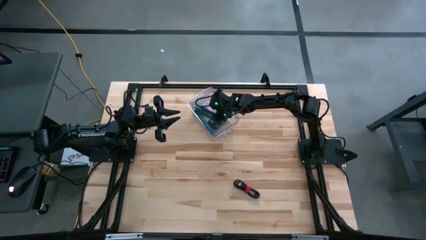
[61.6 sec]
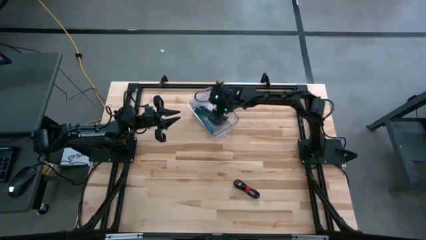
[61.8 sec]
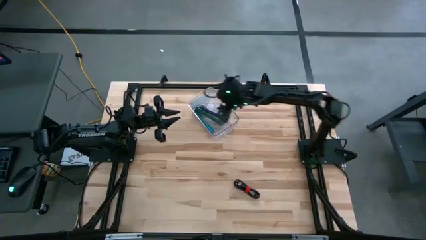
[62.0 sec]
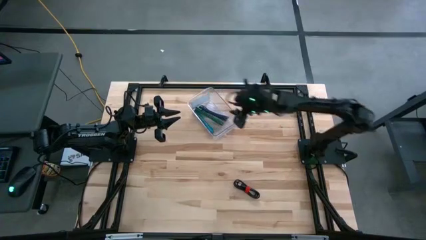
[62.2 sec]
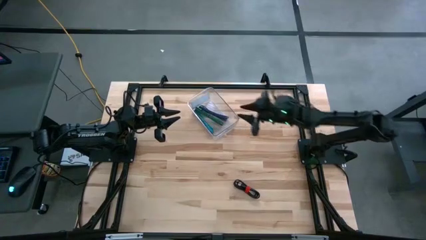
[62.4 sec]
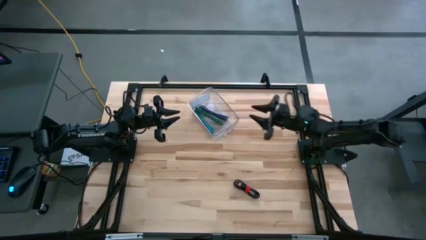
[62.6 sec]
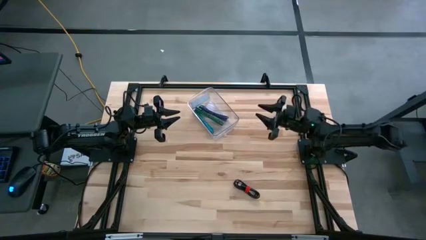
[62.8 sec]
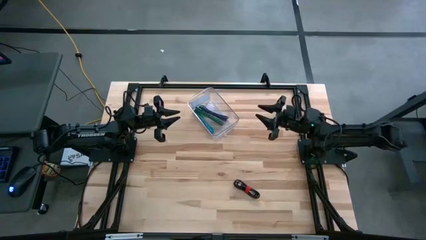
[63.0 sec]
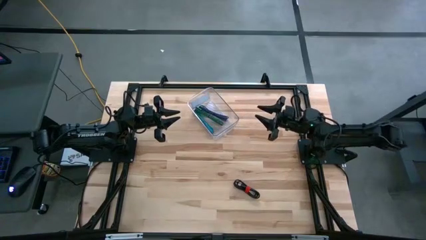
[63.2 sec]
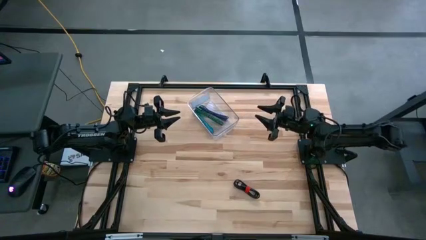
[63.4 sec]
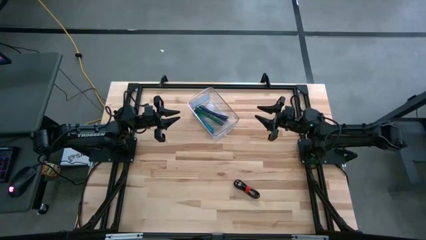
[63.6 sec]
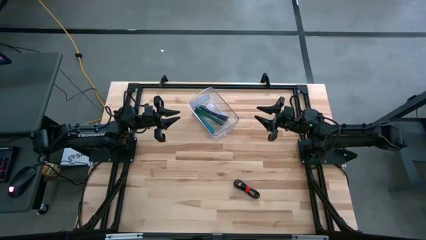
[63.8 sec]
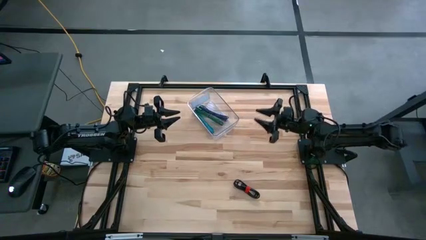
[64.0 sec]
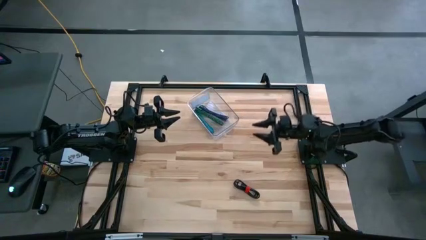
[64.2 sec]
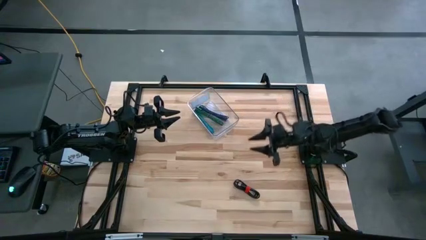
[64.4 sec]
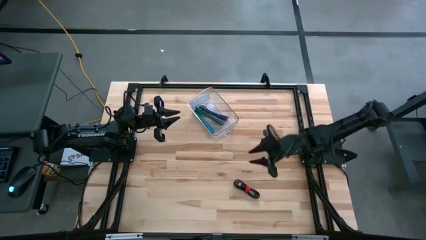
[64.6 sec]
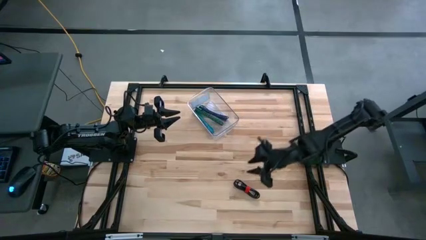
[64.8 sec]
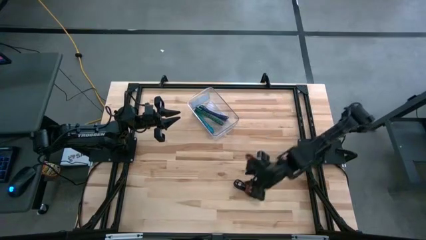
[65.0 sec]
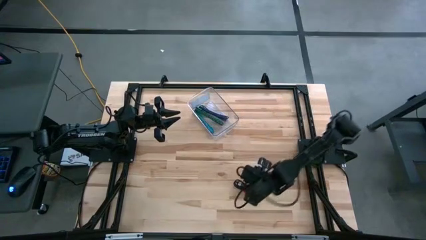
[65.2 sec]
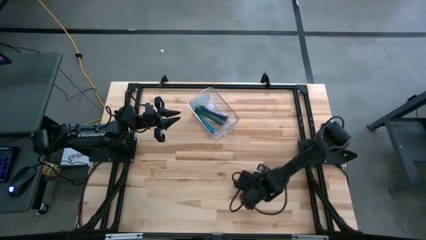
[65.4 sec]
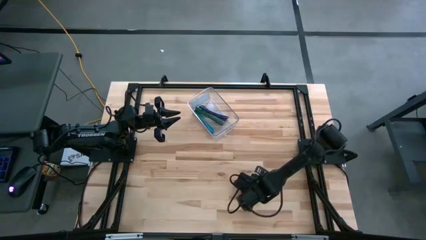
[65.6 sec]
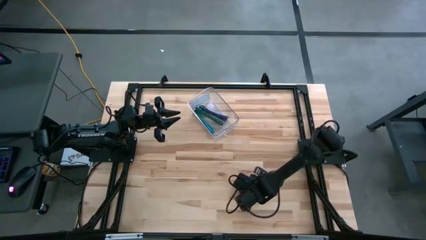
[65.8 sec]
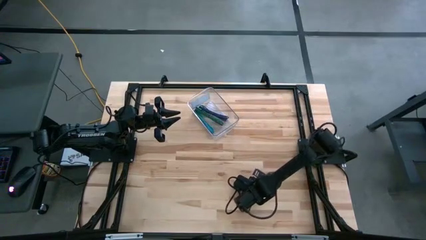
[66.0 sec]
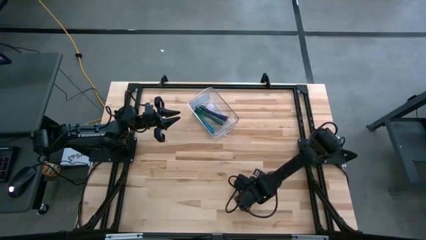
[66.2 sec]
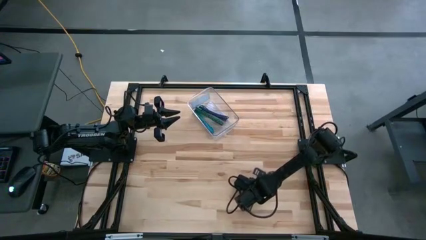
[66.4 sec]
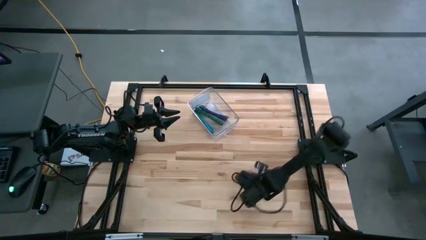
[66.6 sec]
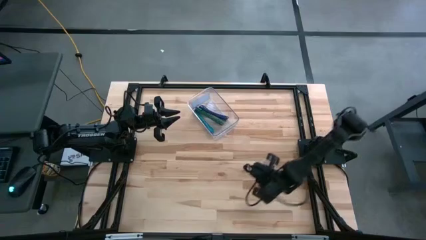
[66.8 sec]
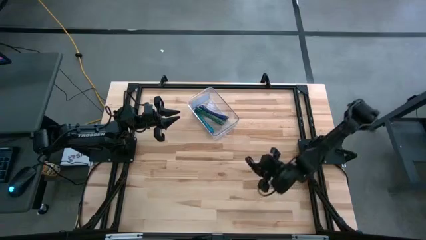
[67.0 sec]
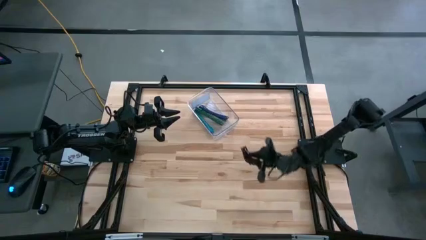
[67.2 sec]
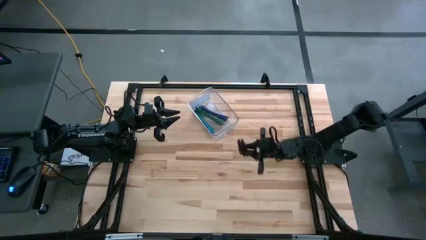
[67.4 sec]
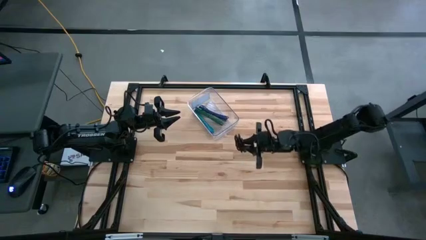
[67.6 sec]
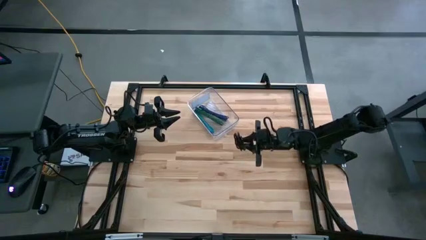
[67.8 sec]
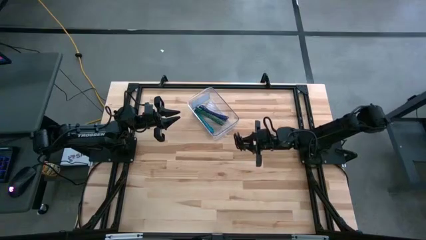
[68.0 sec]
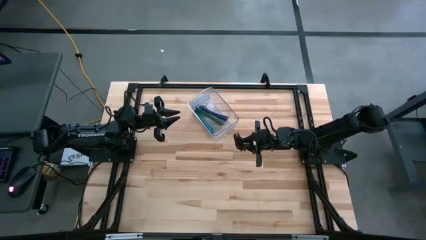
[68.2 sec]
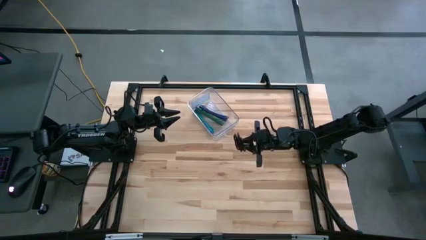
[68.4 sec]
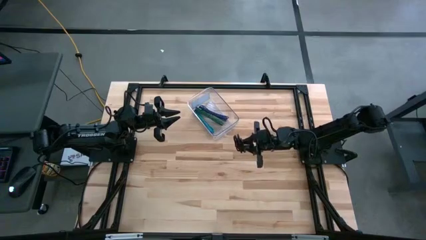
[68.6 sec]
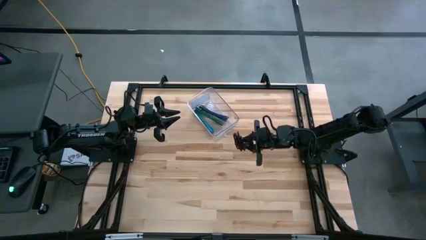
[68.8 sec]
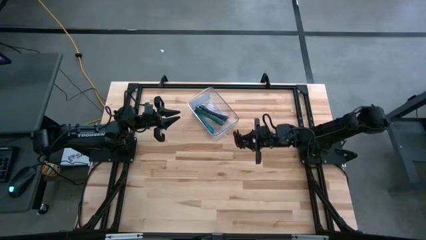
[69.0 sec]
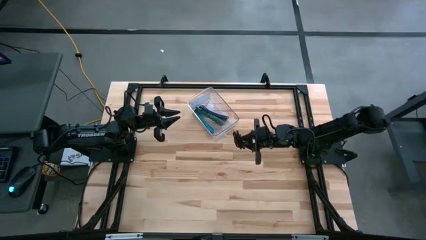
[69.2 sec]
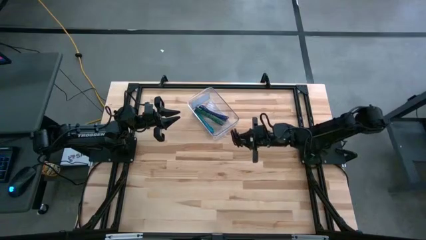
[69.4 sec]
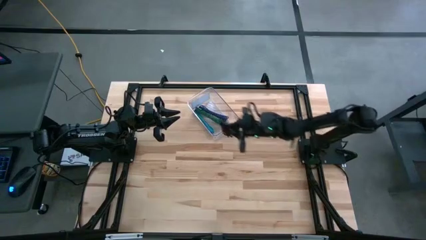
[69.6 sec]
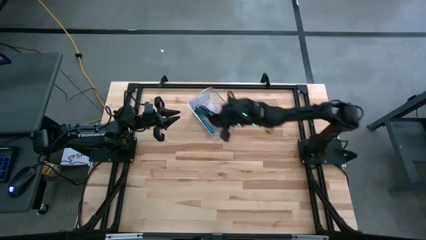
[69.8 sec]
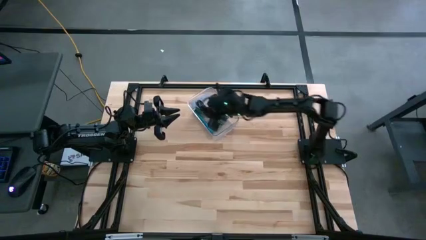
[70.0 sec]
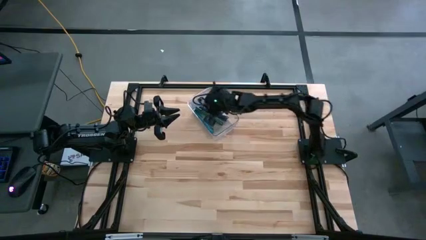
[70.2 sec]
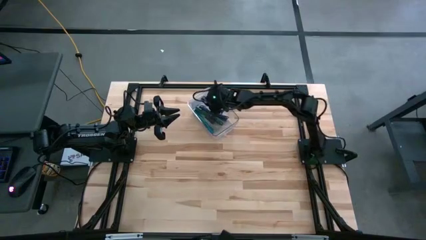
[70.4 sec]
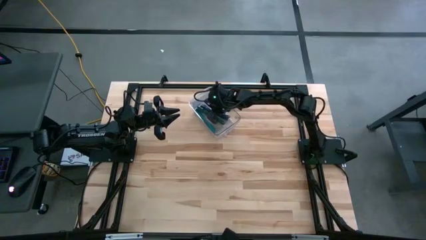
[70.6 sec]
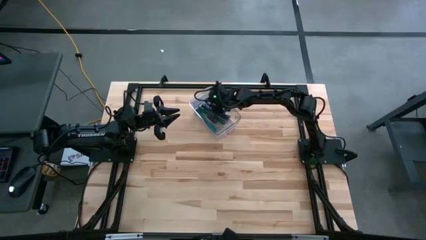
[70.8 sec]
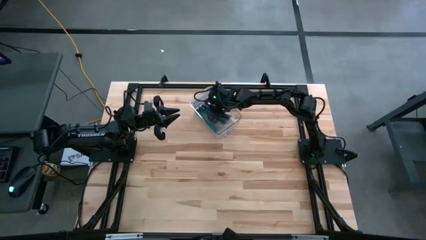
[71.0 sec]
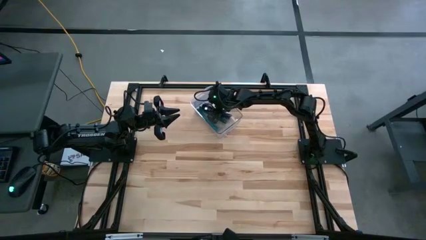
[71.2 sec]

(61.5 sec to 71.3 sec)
Task: Pick and place USB-C Cables
Put the black charger cable into the transparent bin

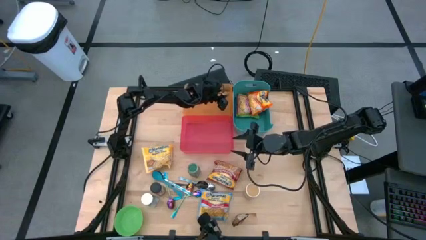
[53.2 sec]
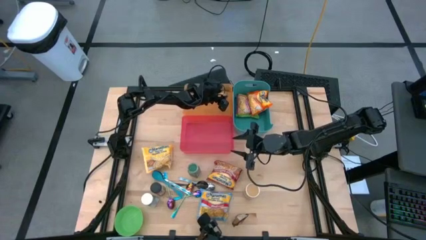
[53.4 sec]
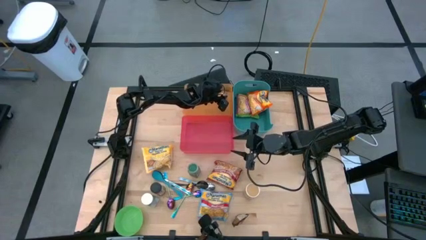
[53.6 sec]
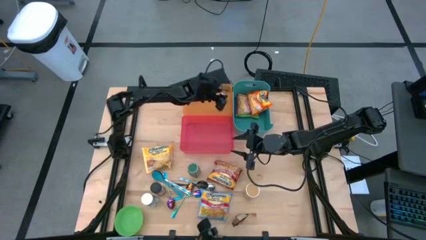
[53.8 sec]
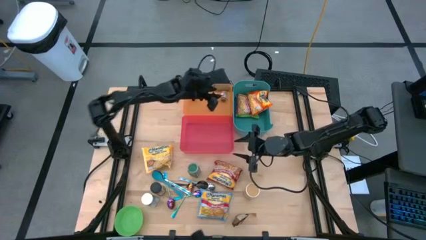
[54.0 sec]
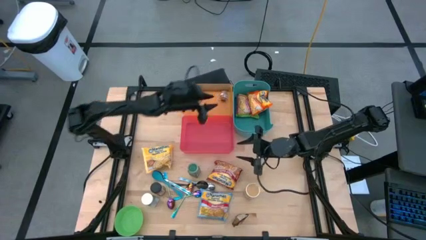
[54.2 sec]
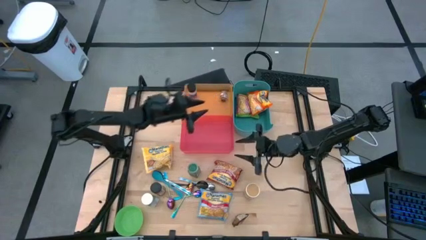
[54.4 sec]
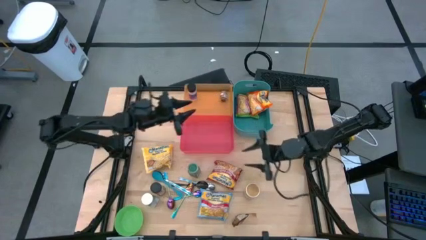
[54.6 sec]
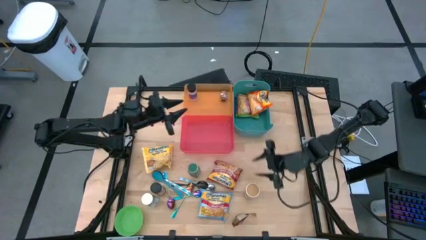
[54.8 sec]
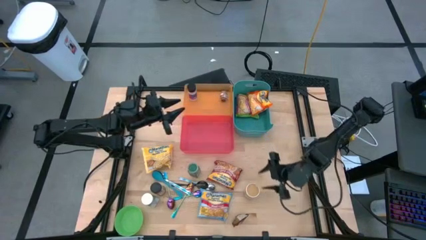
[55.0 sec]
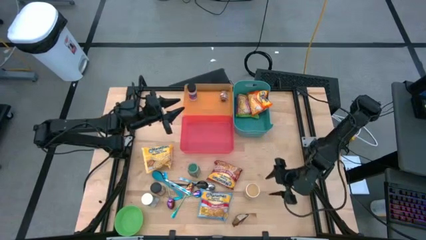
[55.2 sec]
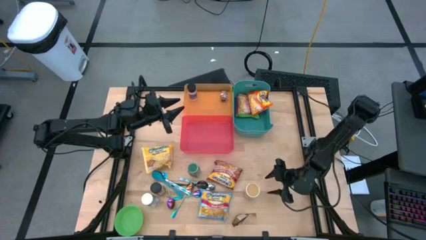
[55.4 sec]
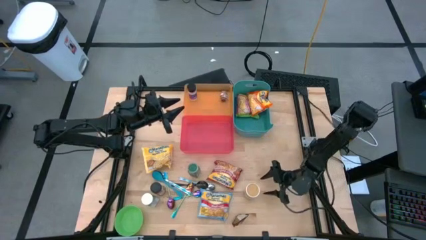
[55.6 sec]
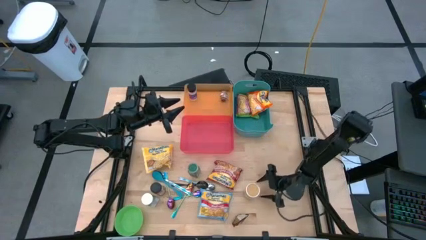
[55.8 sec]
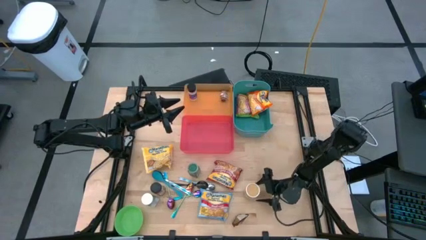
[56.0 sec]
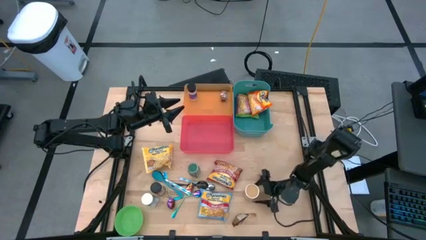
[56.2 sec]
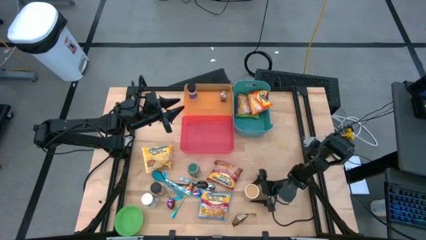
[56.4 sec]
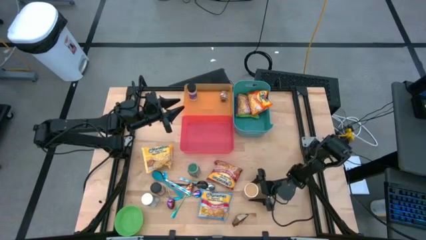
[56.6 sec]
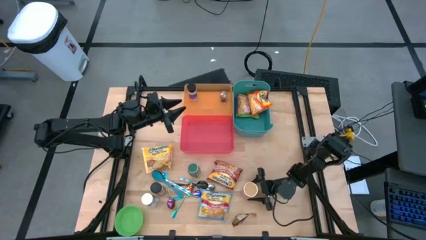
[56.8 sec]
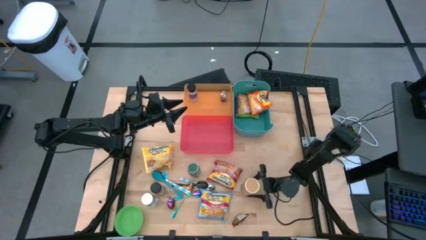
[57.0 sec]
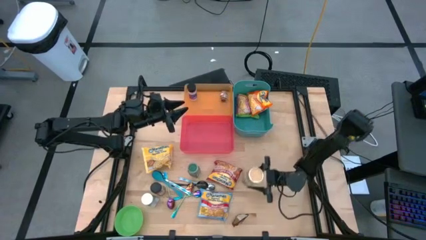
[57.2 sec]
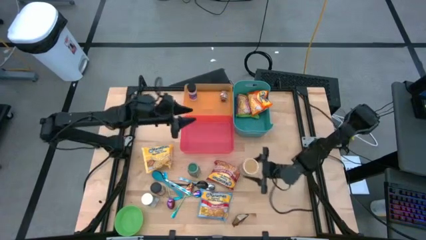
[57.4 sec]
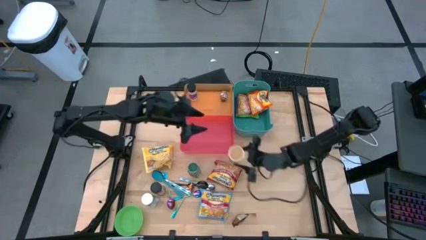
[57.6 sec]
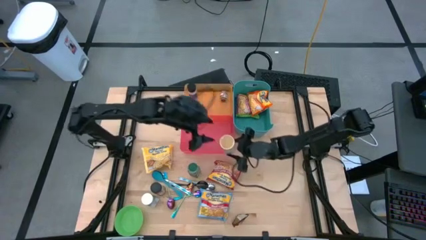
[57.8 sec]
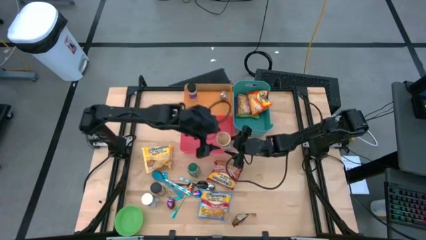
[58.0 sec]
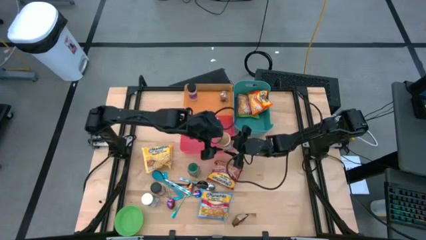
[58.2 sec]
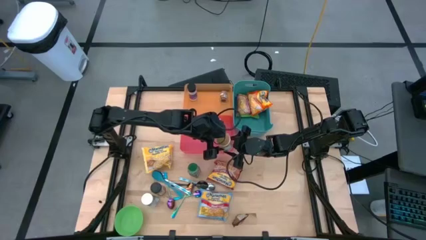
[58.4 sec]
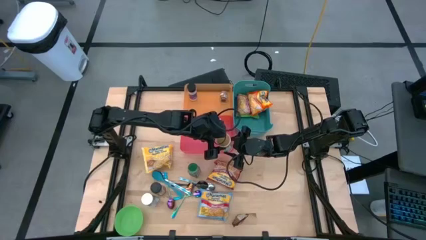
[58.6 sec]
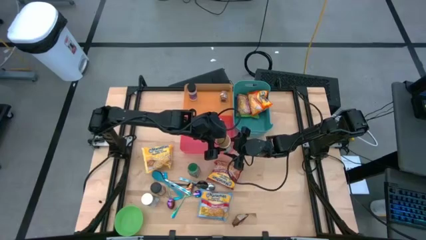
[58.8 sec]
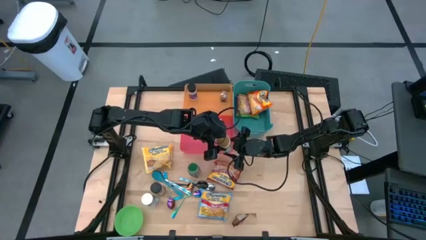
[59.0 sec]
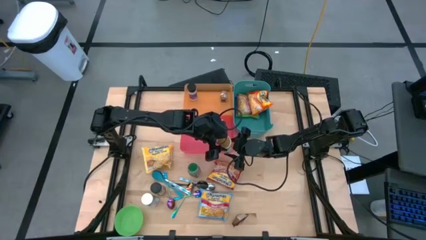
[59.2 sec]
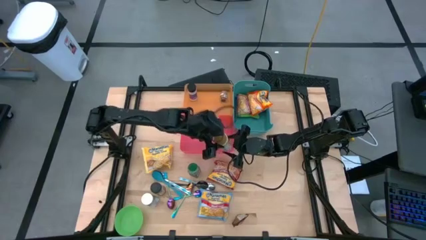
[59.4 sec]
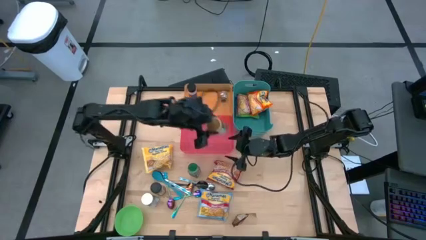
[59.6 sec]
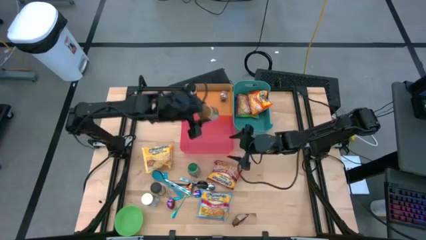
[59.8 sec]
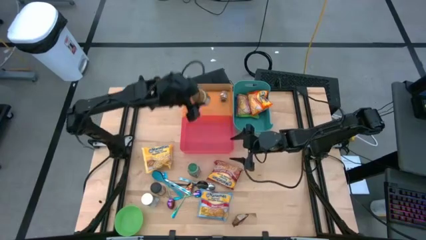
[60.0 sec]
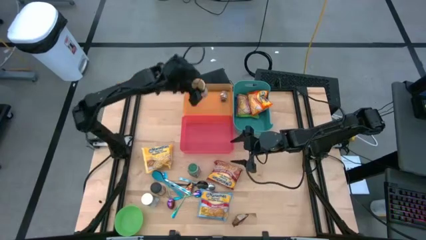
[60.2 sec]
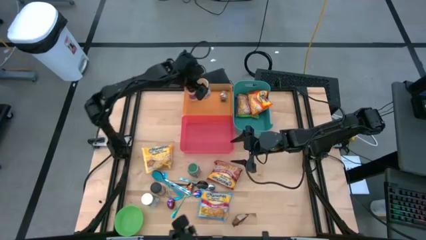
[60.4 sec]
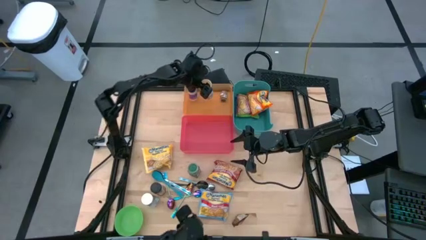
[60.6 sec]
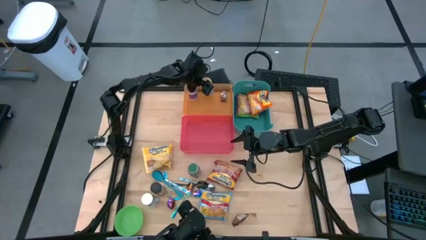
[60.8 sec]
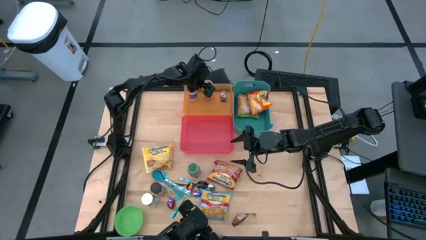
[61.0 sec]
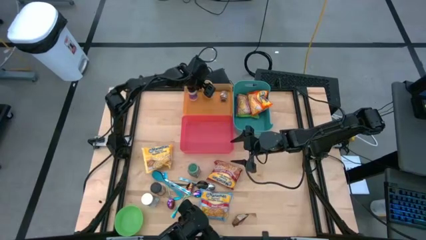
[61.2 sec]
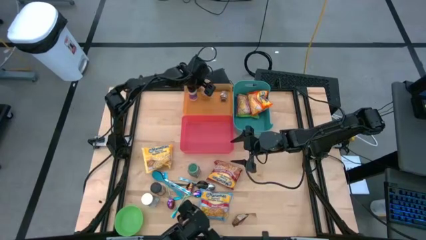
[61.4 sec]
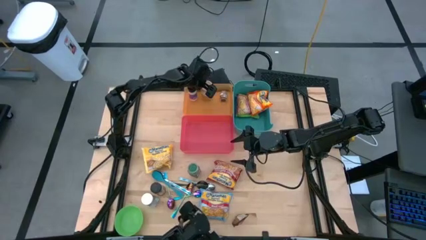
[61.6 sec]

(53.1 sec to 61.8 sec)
Task: Pick & Place Food Item
Put the gold spice bottle into the orange bin
